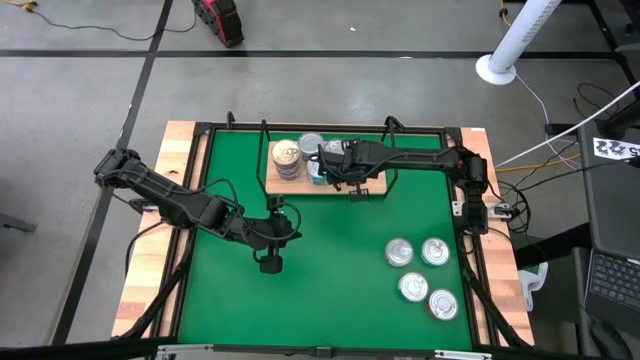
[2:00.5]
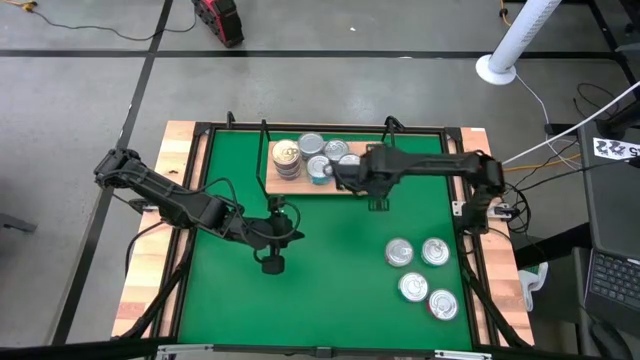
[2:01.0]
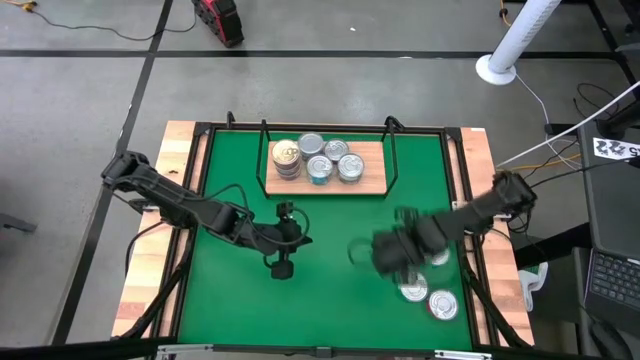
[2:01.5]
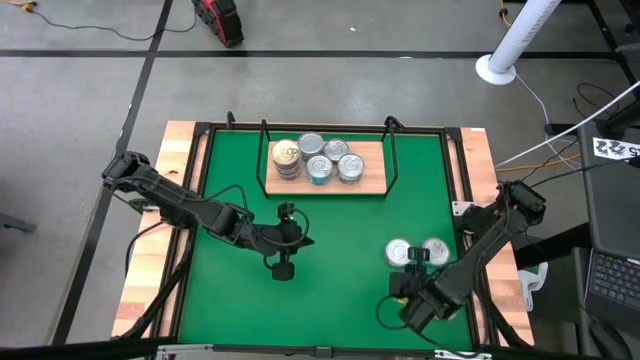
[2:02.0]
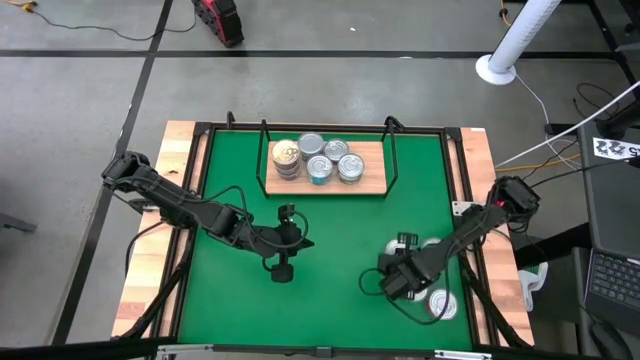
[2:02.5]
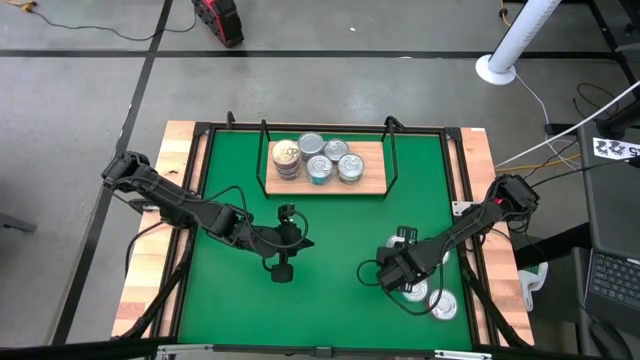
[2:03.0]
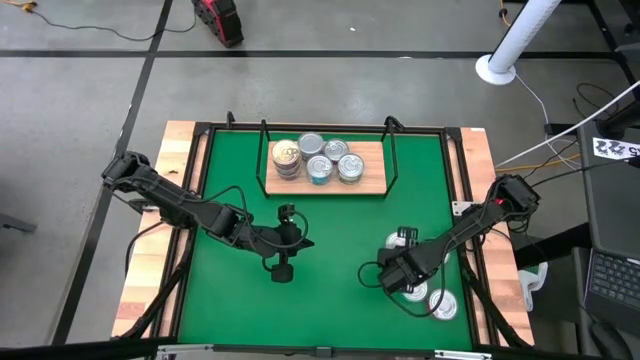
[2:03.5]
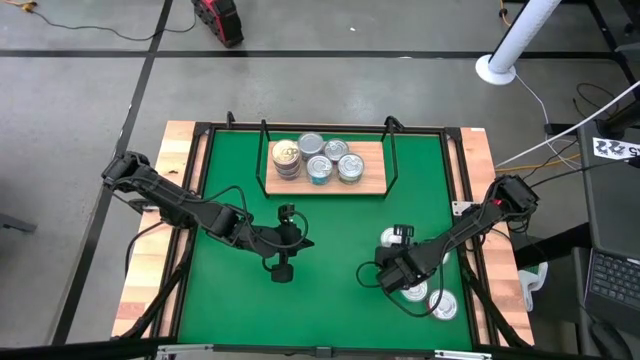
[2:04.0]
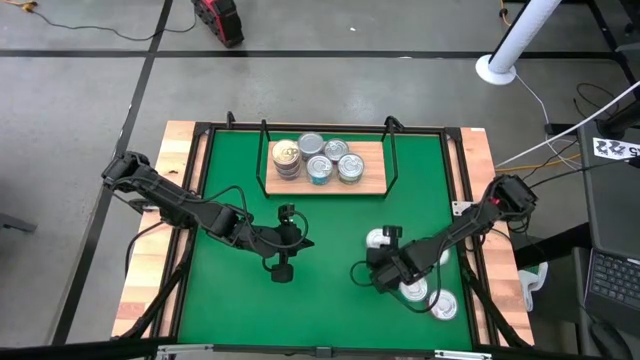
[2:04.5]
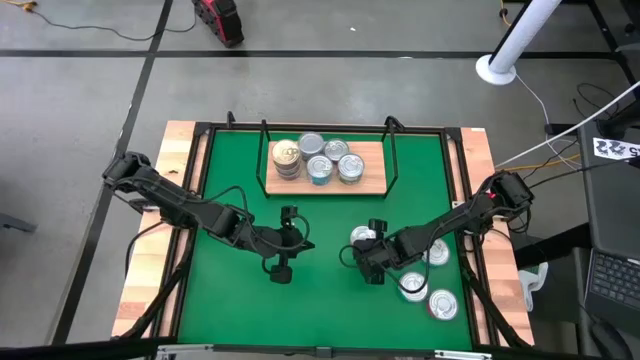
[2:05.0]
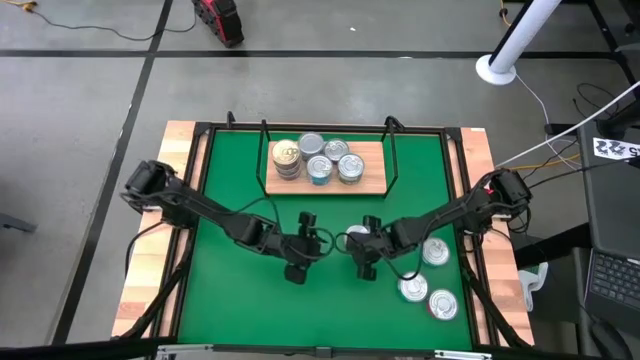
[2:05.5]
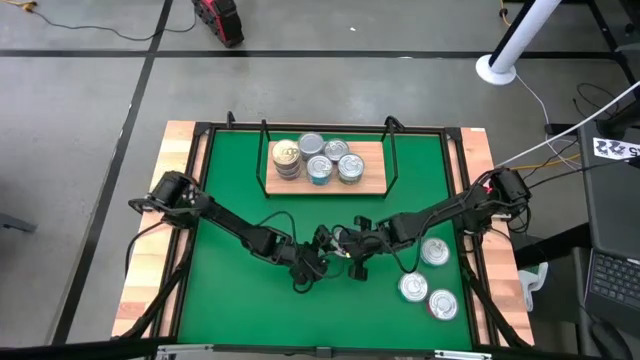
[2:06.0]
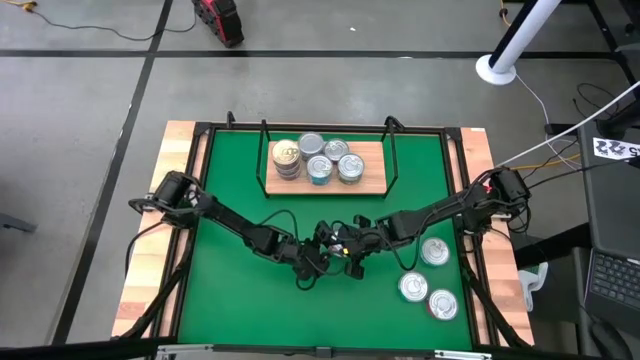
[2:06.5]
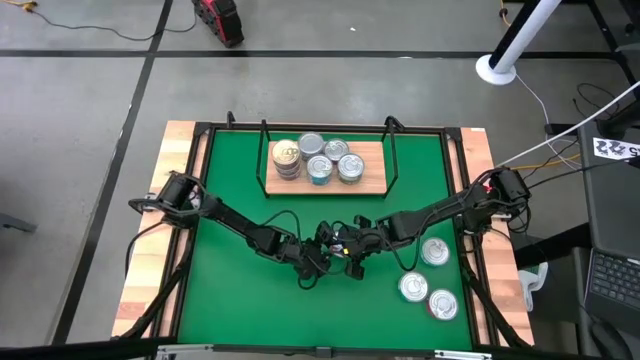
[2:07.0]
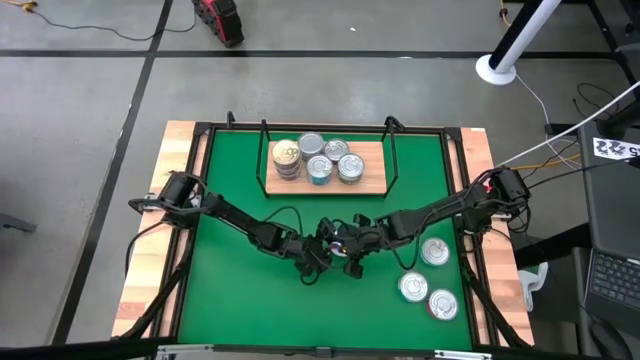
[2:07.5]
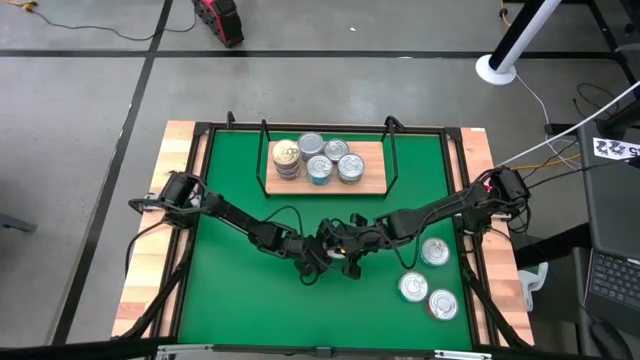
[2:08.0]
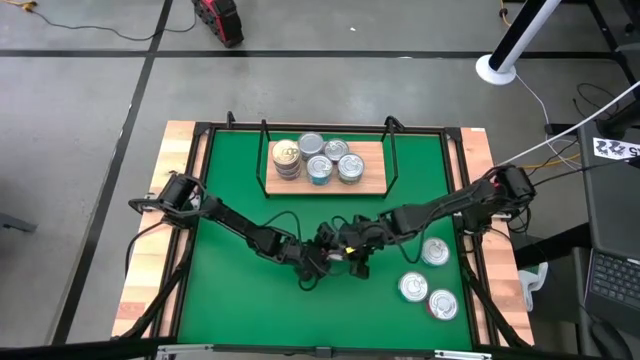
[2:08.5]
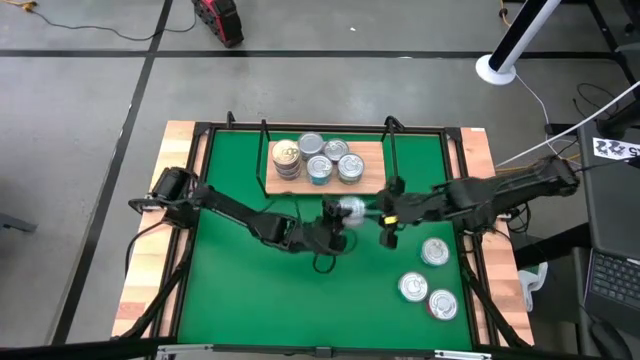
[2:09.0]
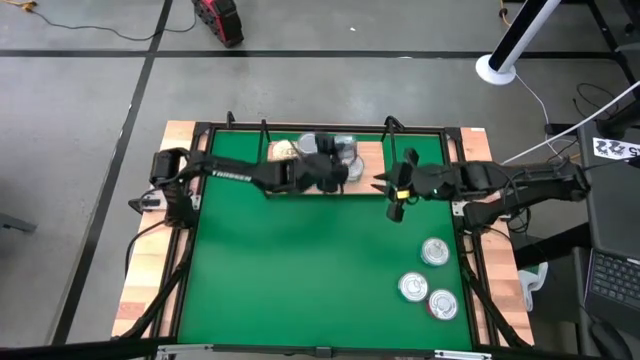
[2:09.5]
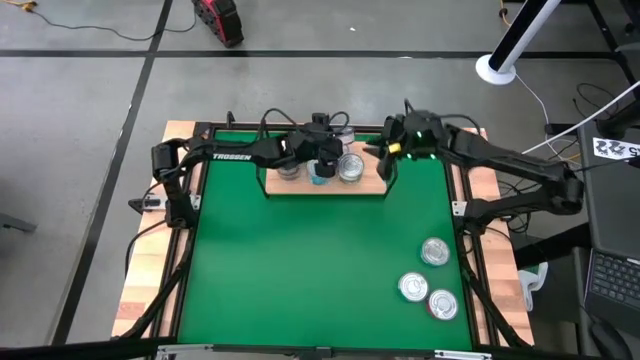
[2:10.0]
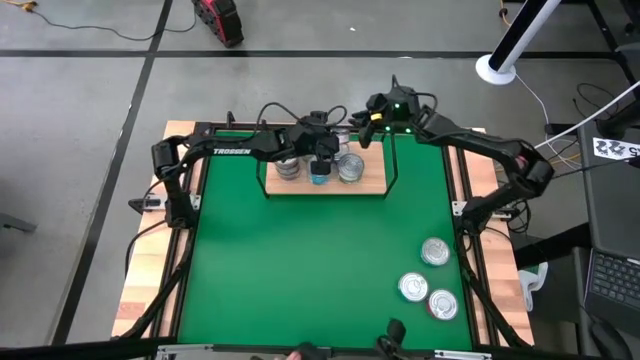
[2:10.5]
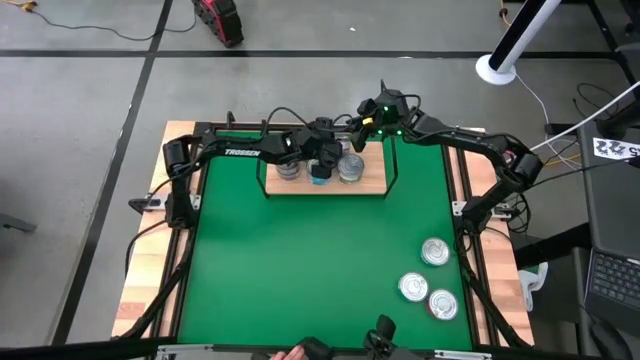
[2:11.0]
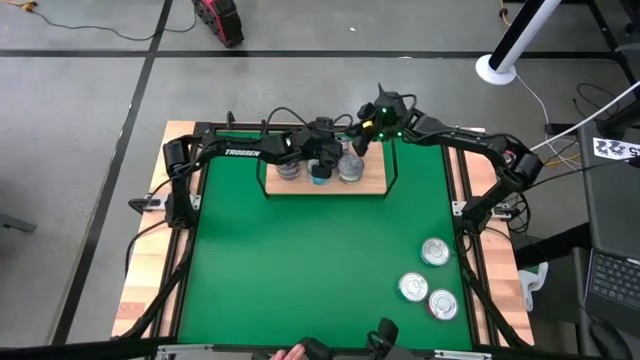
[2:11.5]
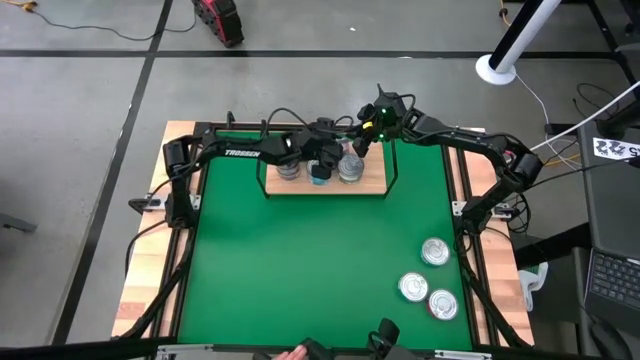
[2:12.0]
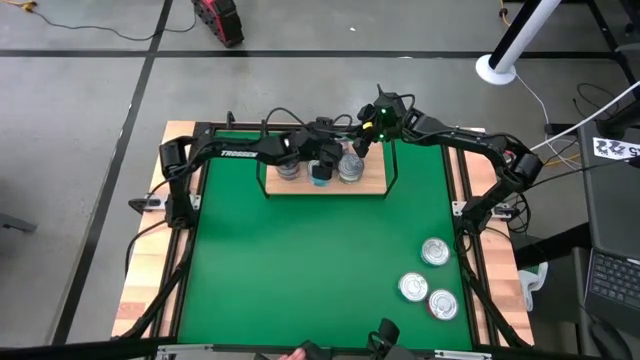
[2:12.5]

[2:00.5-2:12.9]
Task: Stack canned seafood by type on shelf
Stack the red tuna can on top of the other red tuna can on the shelf

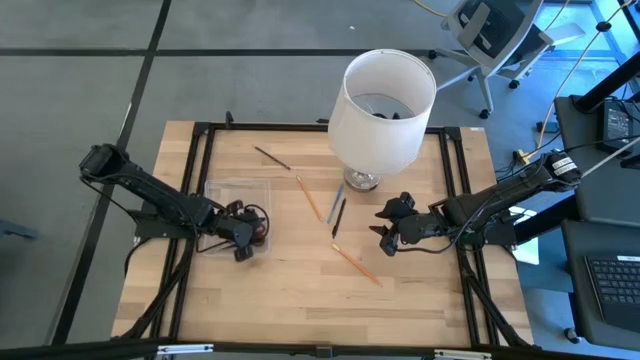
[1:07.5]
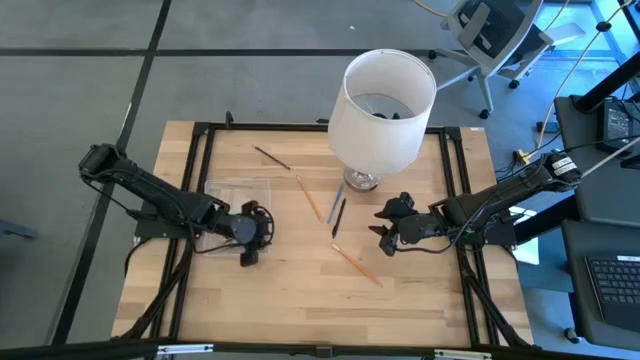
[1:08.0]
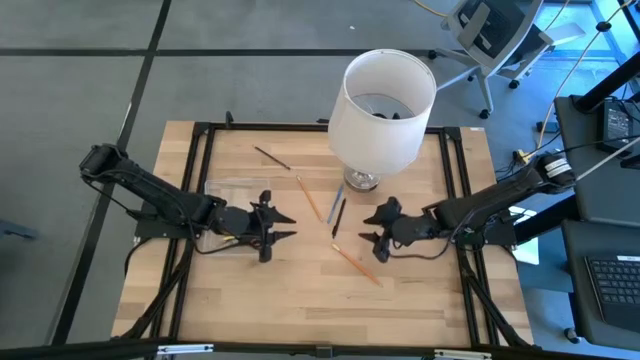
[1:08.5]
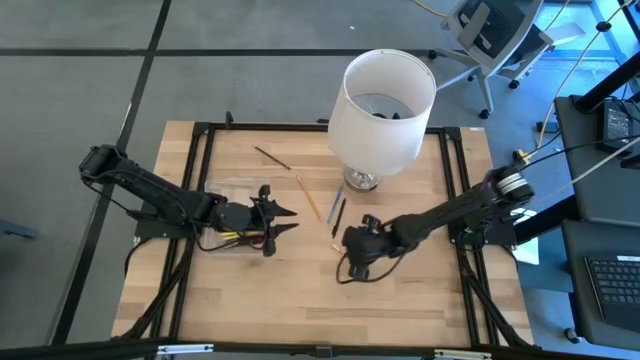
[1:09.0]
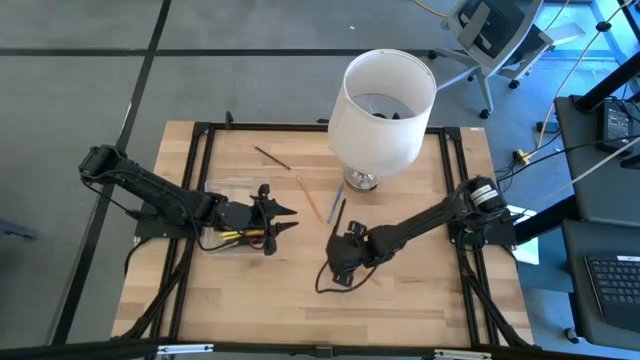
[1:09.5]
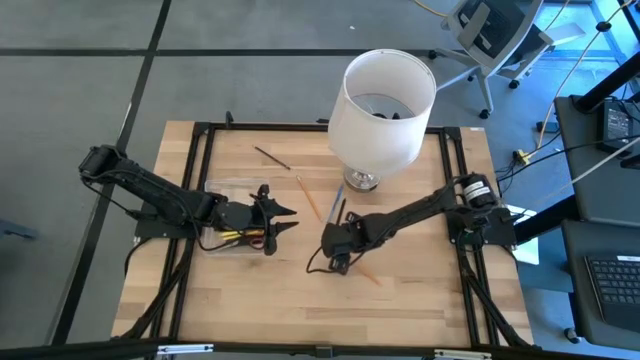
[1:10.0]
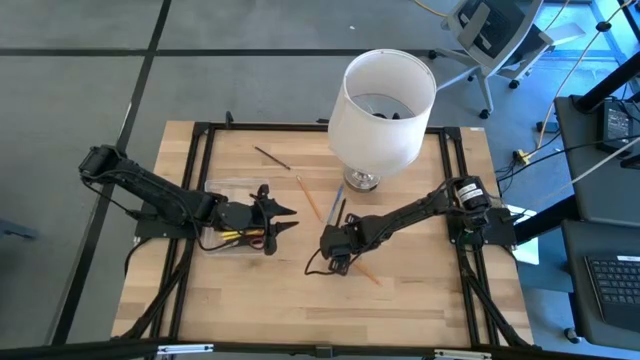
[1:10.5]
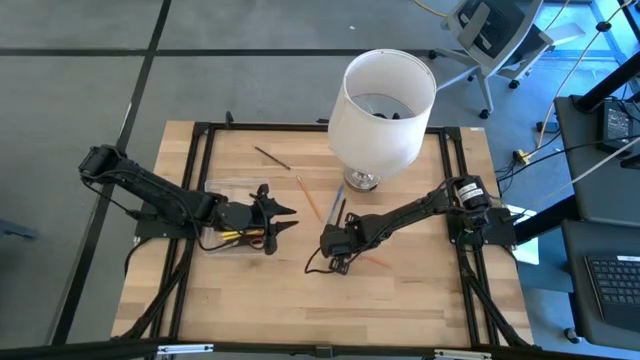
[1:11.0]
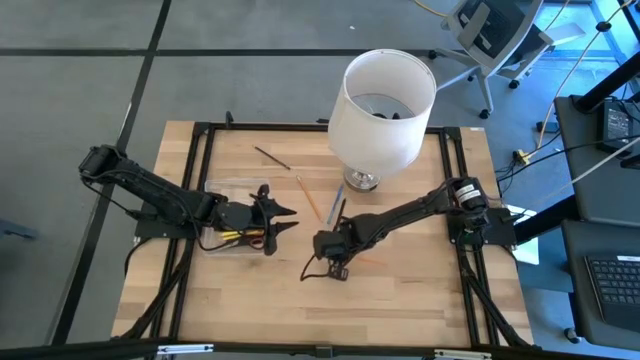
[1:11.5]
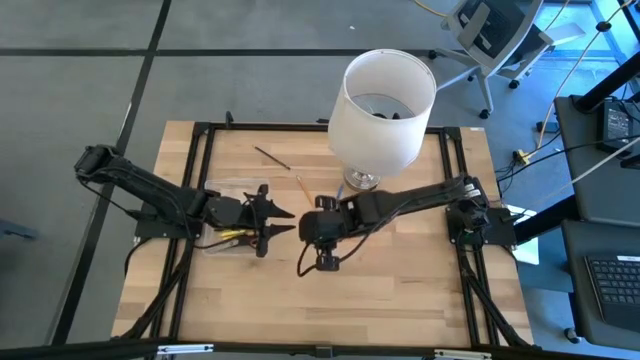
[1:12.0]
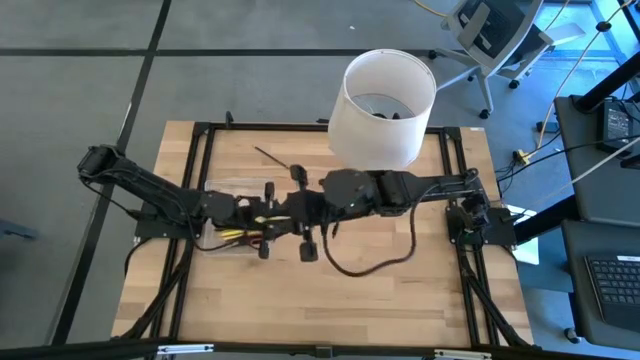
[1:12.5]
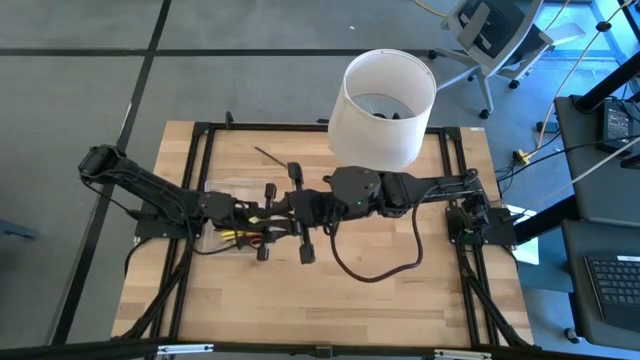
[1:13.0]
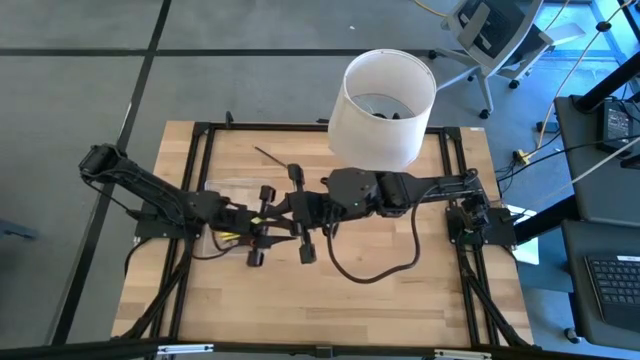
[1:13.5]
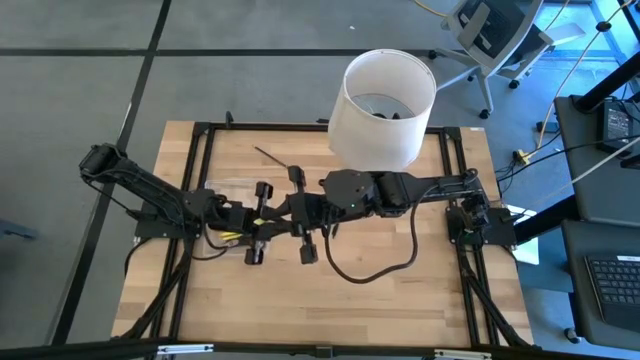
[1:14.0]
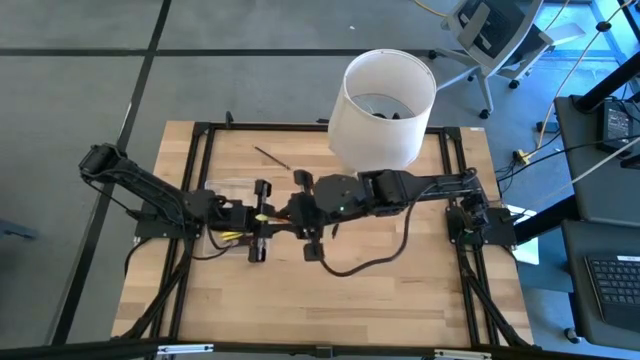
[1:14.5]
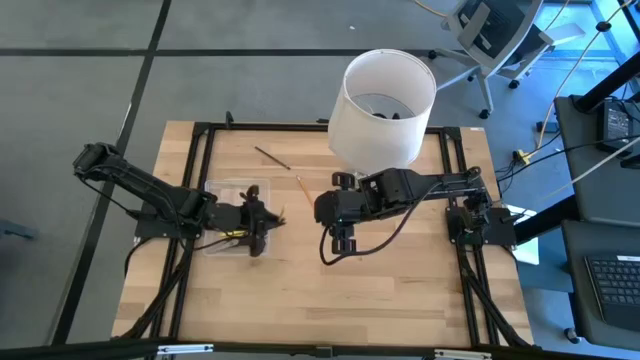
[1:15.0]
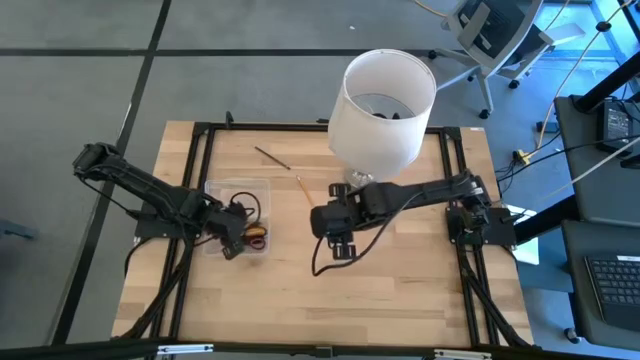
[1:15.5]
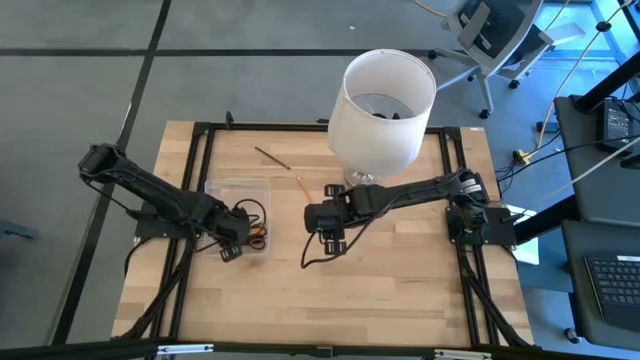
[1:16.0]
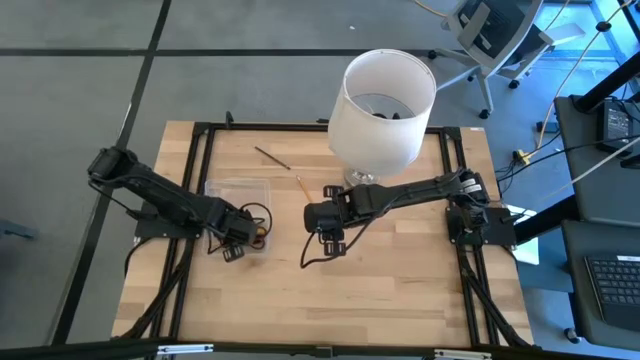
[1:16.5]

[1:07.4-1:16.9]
Task: Pick & place school supplies into a supply box
Put the yellow pencil into the transparent supply box
